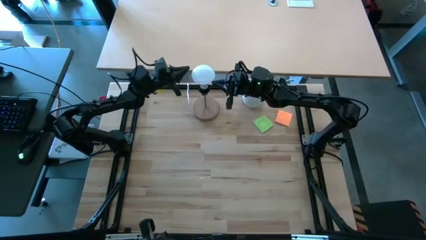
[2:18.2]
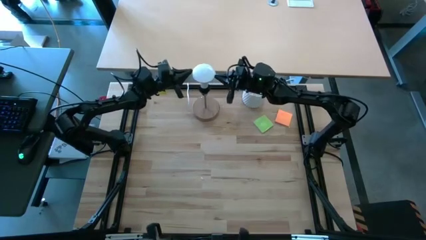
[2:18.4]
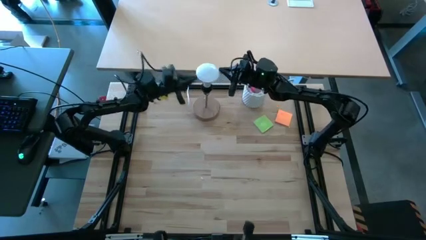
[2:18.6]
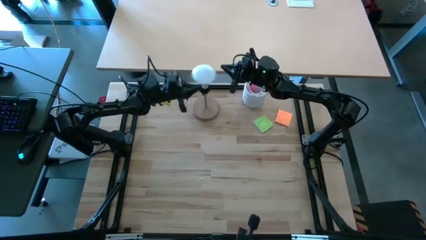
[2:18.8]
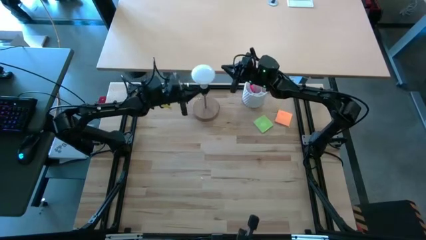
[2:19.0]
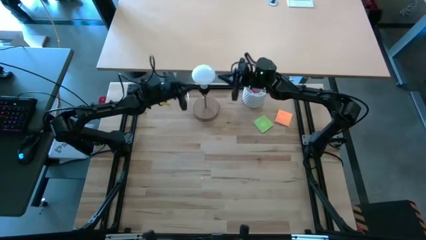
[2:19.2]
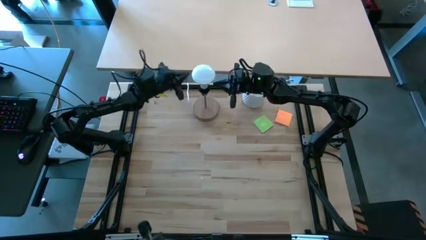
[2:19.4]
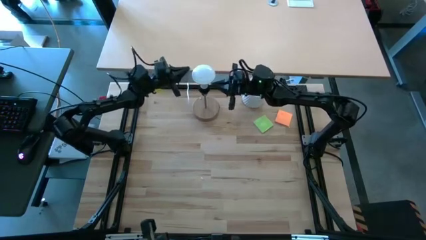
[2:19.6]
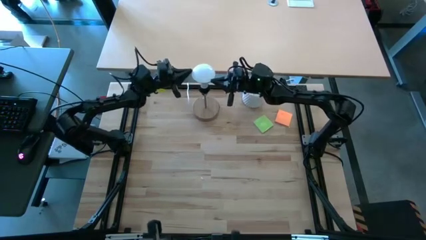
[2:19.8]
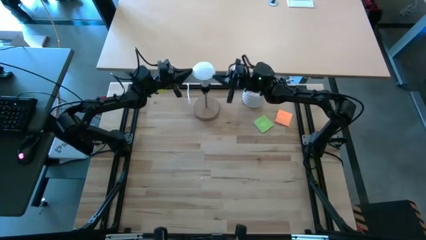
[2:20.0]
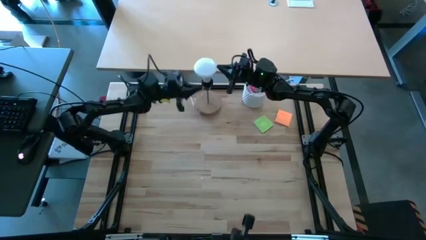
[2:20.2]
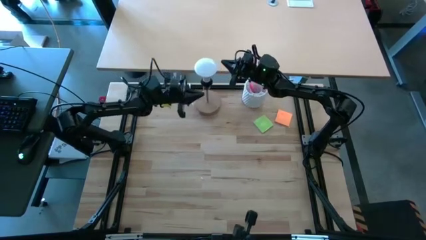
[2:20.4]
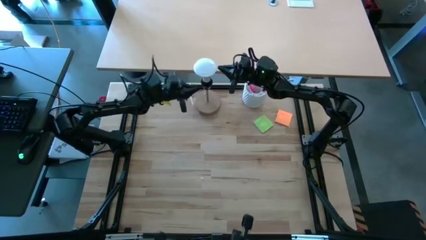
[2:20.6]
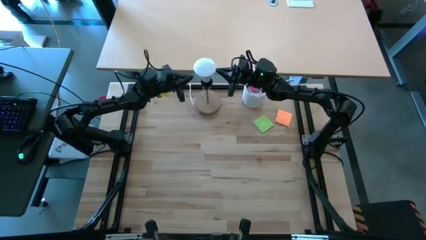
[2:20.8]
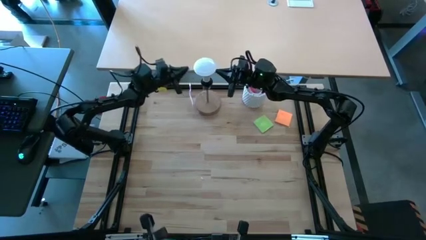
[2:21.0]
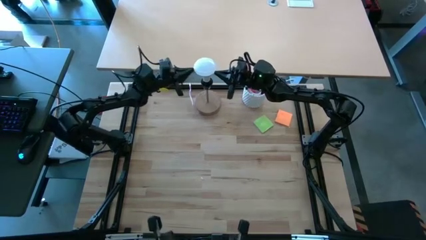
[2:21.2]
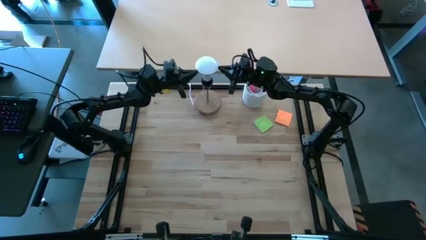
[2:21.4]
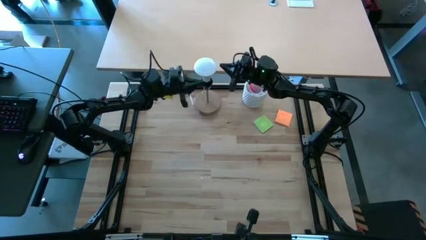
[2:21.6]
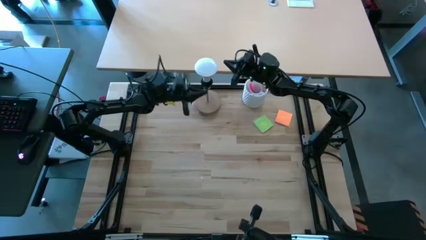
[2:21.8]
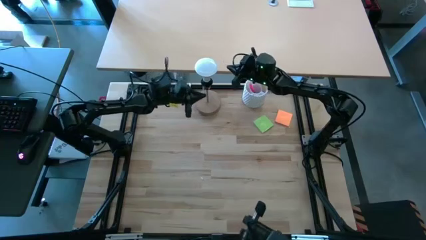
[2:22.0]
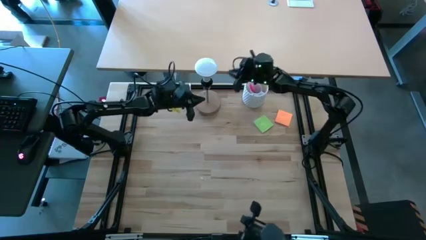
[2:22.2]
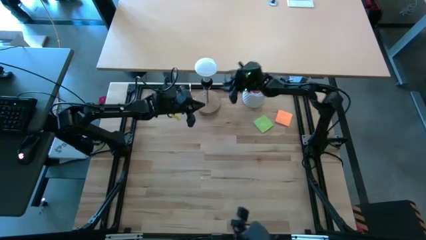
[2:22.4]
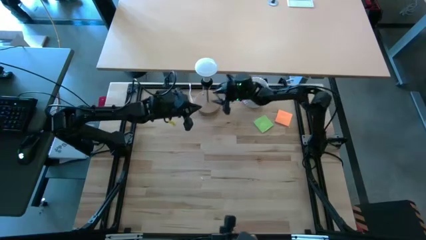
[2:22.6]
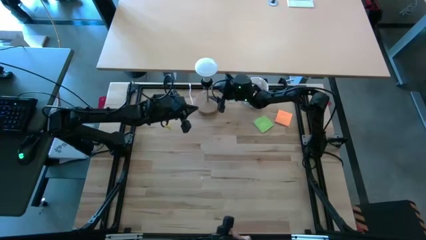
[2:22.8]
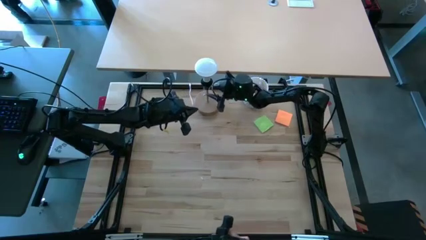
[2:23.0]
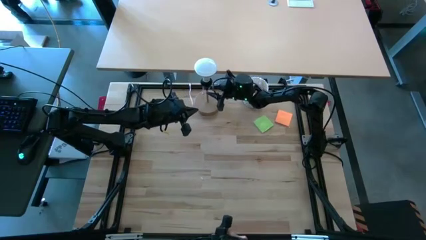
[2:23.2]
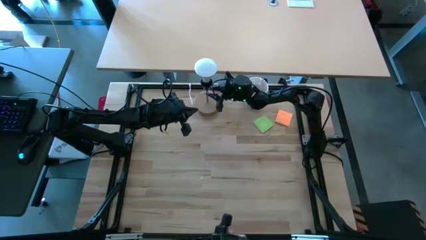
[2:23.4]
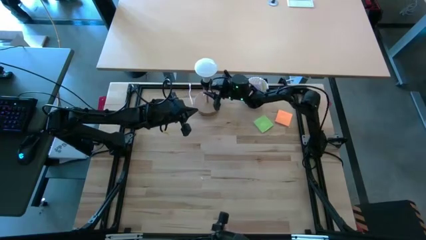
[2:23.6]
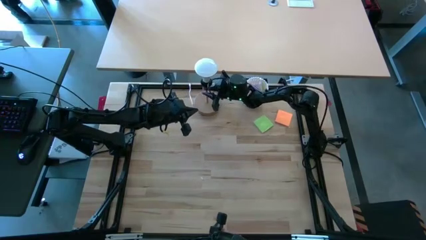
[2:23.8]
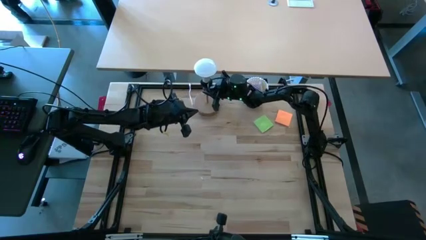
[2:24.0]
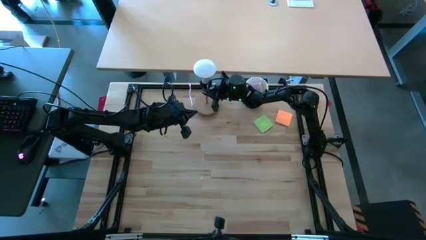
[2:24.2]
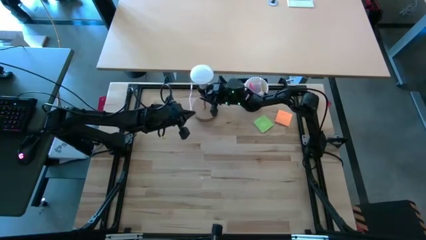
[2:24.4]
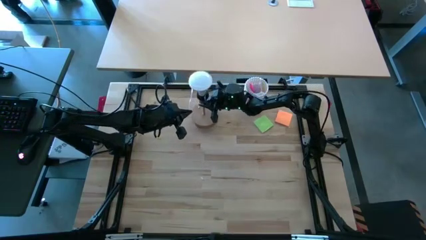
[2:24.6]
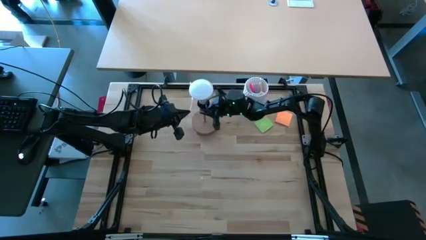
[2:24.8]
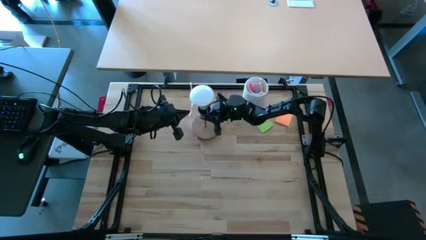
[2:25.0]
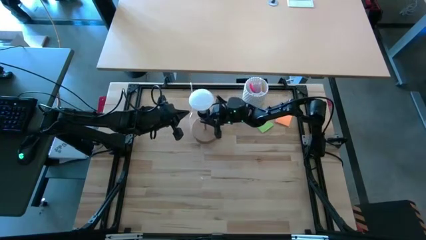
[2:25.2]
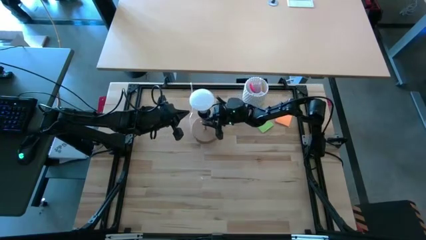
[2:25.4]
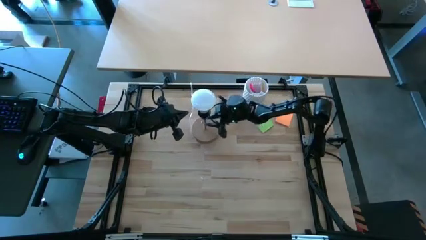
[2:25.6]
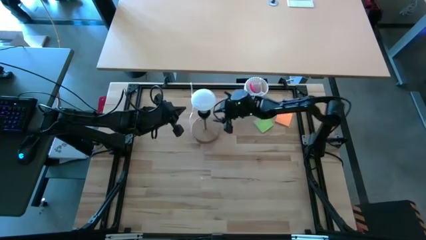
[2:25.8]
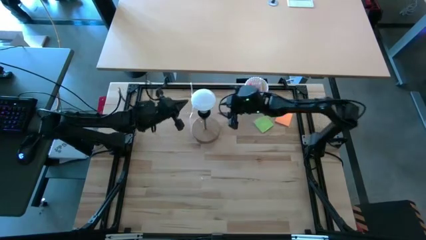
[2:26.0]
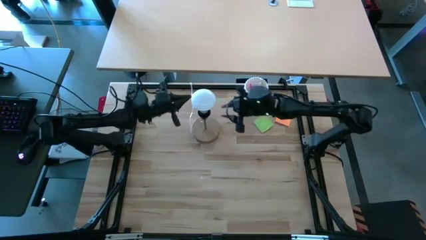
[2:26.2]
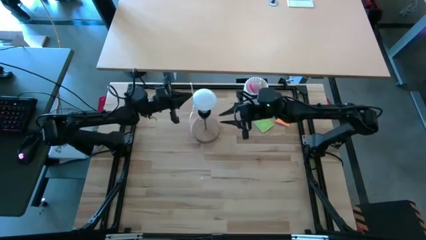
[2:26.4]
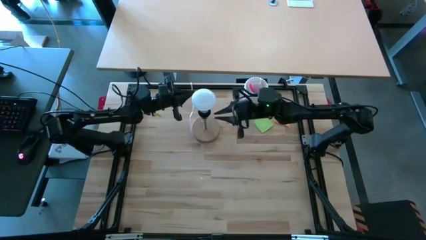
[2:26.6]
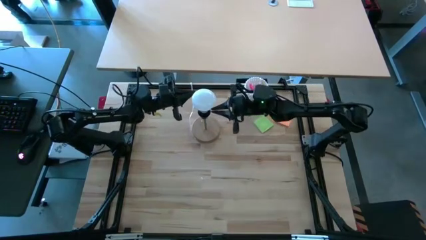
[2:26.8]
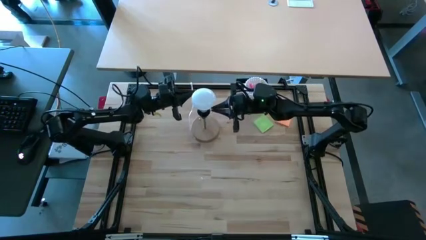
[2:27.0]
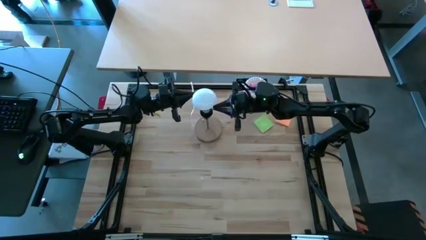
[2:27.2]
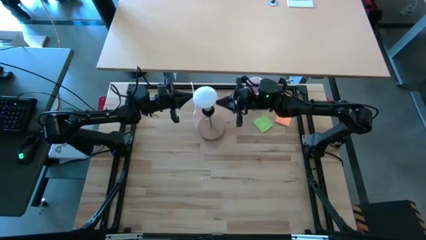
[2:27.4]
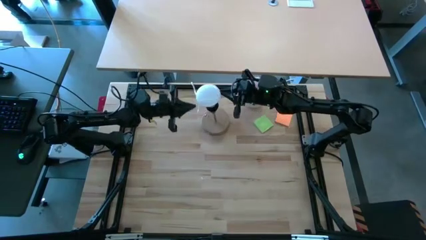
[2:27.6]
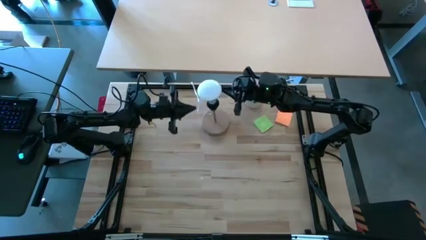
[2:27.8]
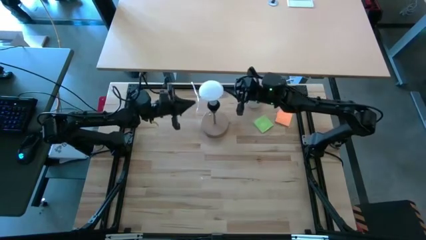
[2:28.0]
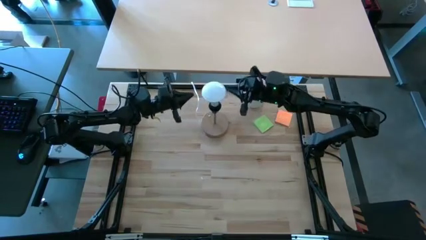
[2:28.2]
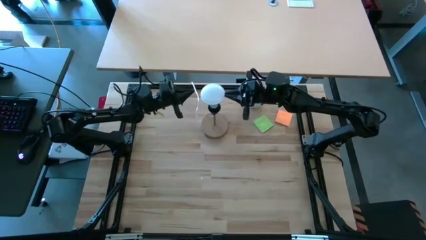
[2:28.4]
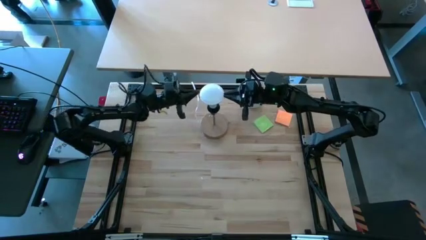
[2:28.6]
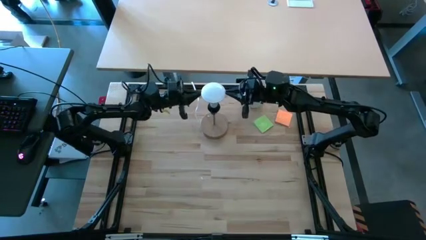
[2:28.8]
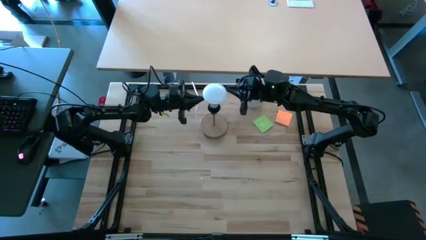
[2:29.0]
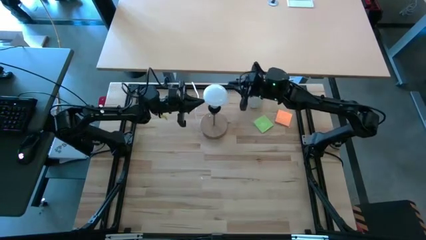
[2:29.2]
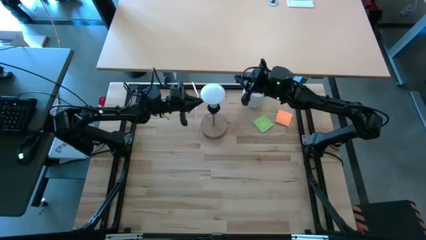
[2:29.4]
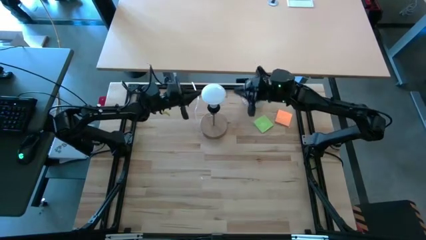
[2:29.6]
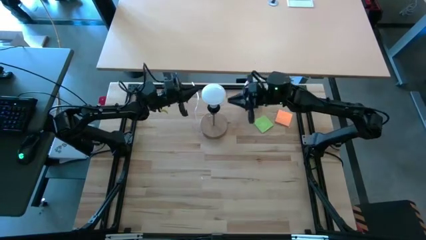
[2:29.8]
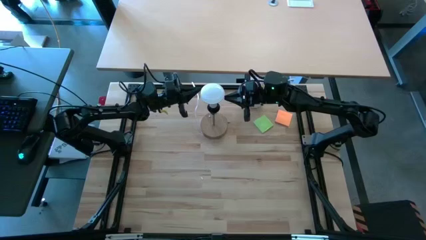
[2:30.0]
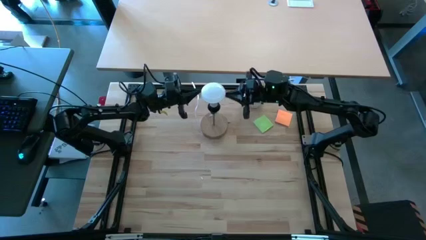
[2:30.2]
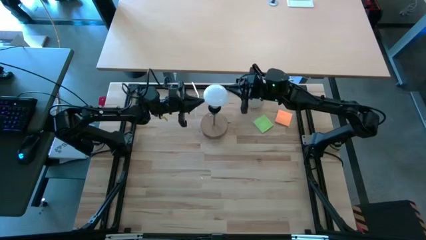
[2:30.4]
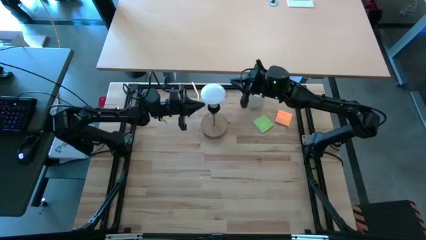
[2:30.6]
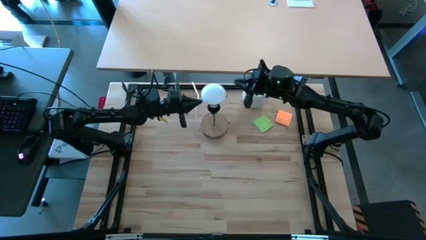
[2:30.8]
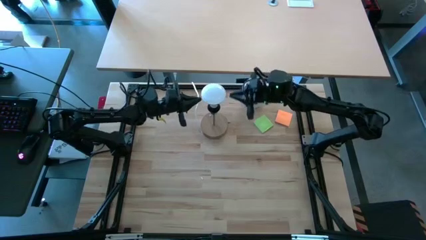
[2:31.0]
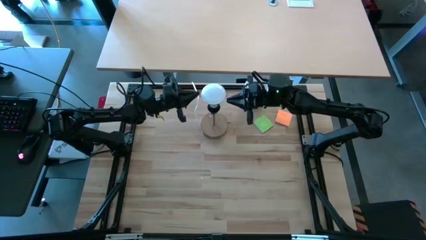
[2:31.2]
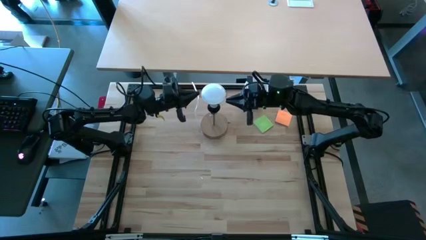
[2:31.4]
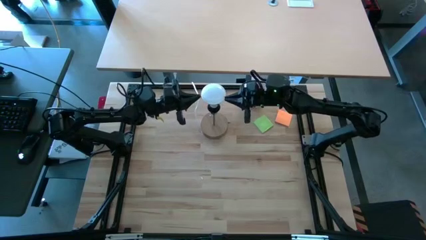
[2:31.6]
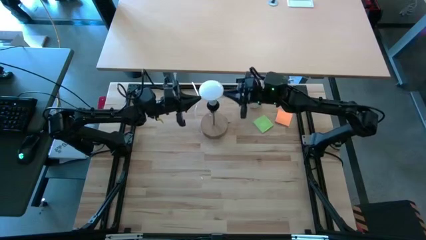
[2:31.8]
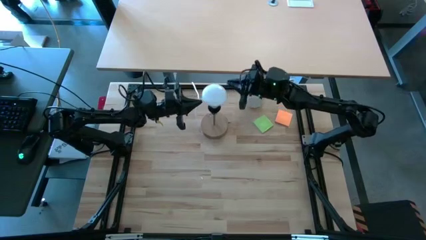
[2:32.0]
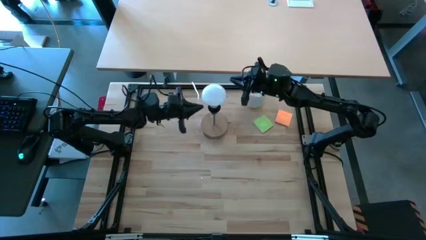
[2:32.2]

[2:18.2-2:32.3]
Task: Screw lightbulb
Remove the white lightbulb from the brown lamp

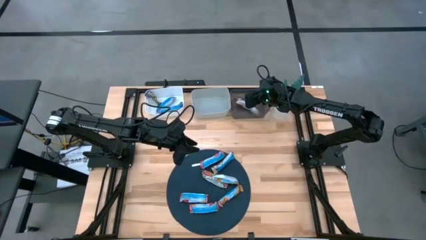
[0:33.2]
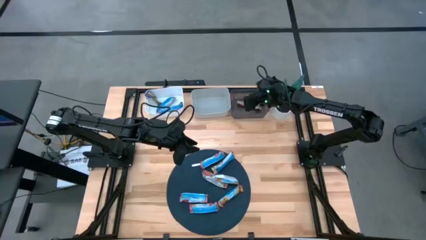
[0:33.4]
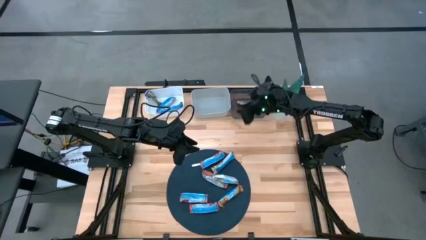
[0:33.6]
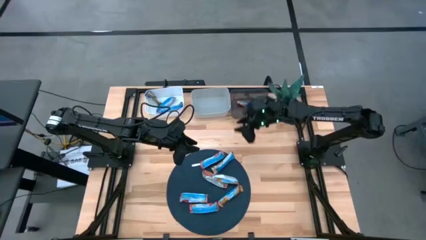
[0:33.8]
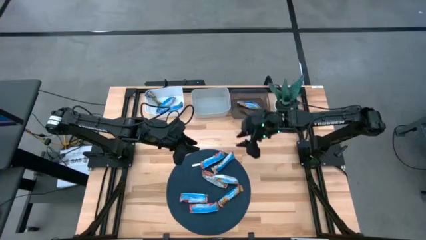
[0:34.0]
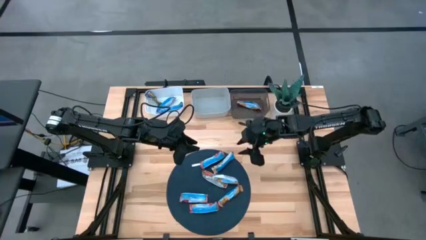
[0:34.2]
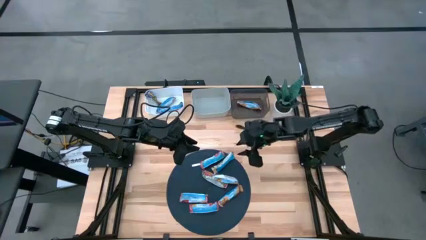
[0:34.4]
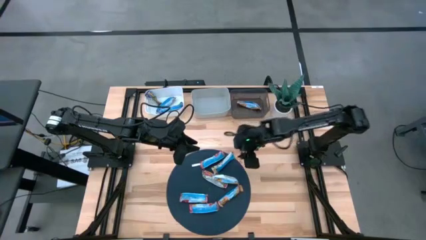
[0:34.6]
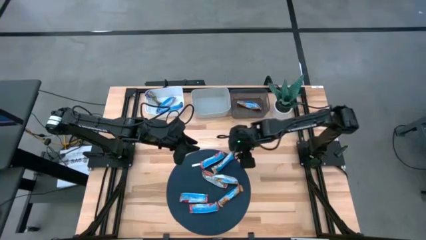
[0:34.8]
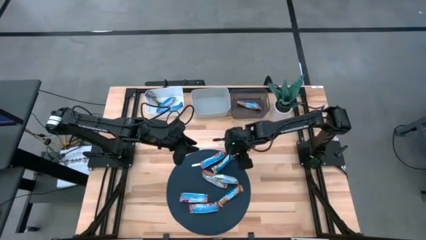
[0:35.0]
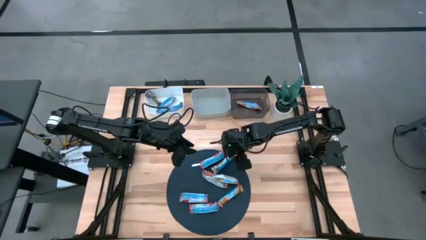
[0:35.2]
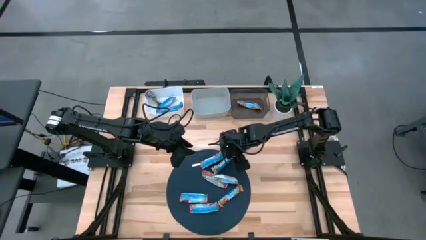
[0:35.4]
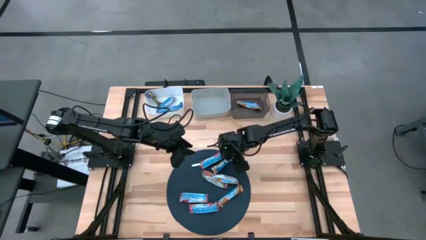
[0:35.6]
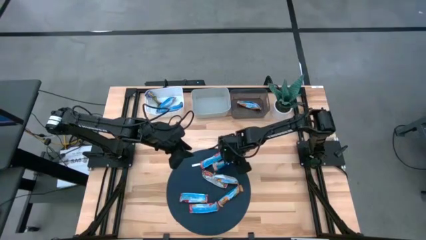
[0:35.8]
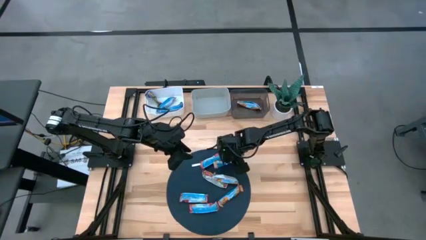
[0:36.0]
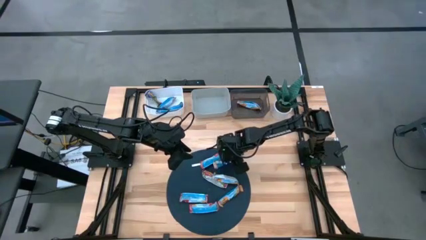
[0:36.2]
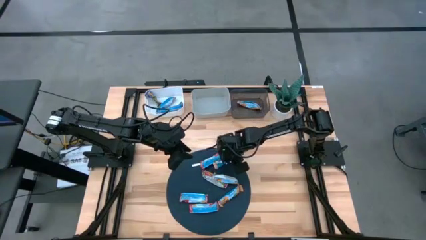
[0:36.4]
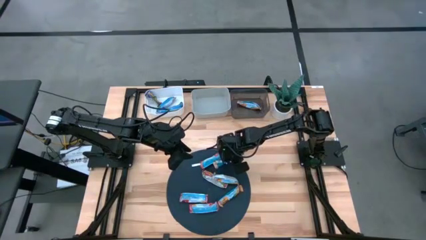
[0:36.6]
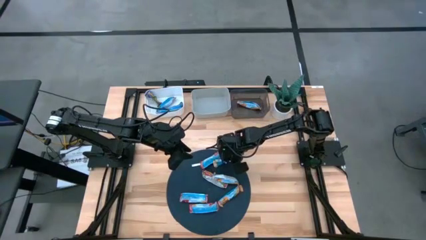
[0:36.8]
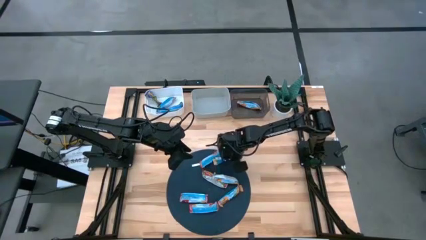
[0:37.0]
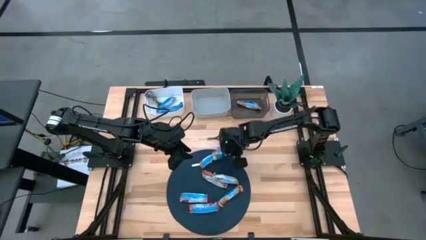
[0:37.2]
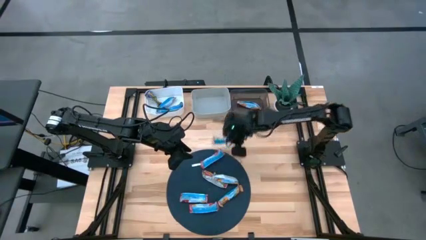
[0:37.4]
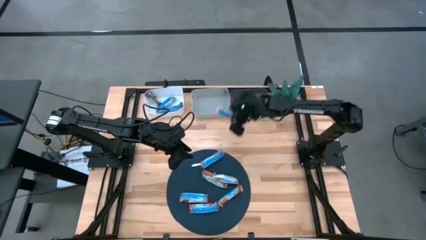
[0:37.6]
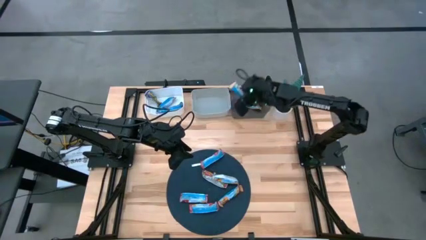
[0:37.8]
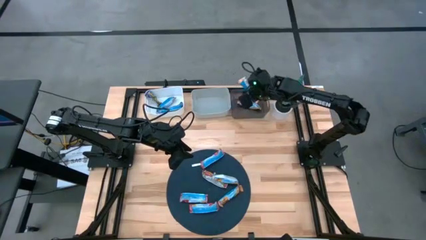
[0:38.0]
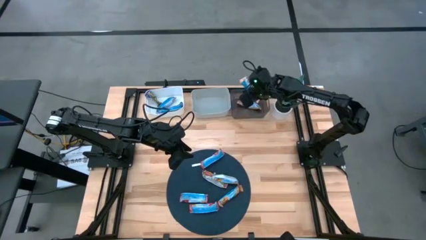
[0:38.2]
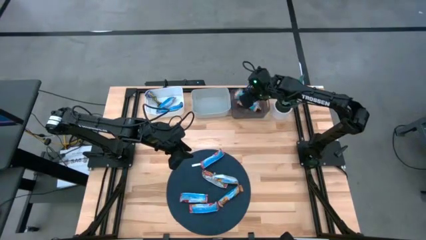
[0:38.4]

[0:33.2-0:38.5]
Task: Pick and place Granola Bars by type
Put the yellow granola bar into the black bin
